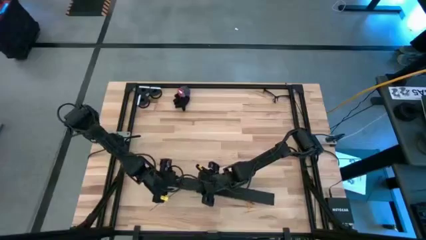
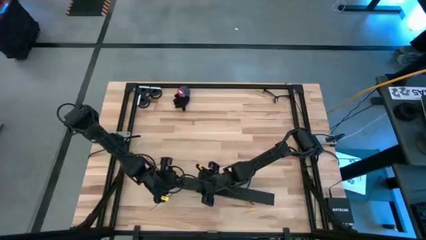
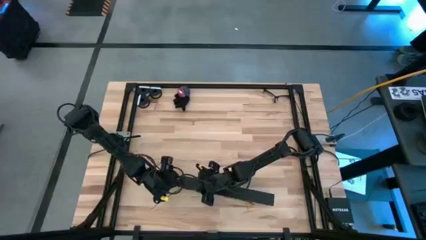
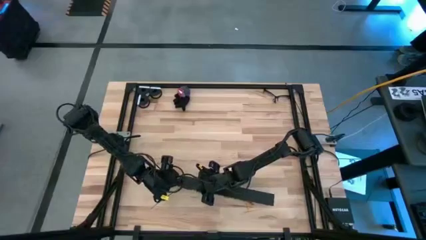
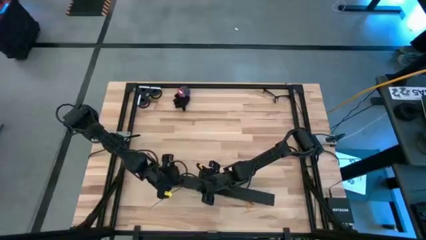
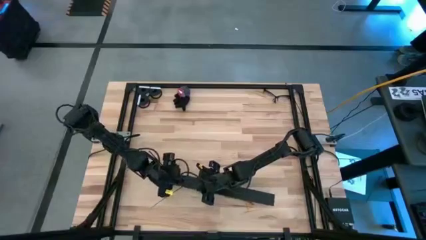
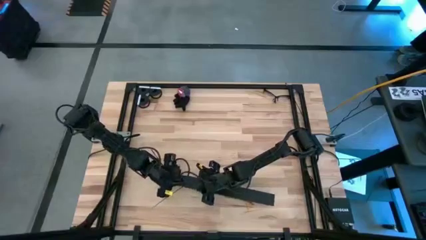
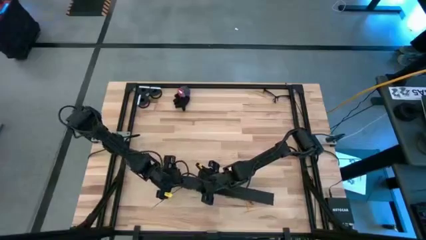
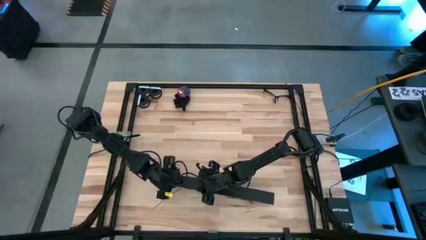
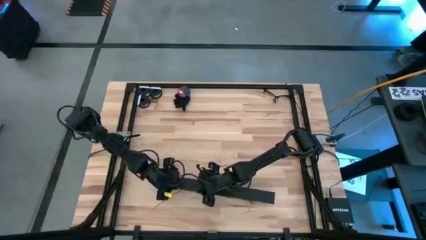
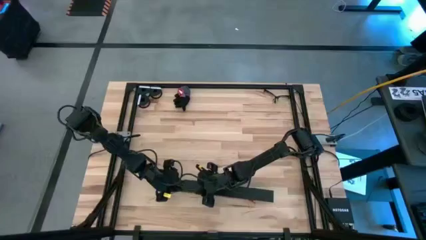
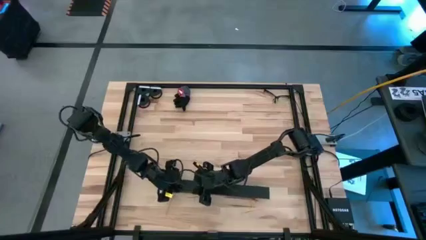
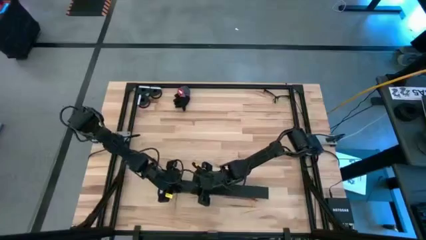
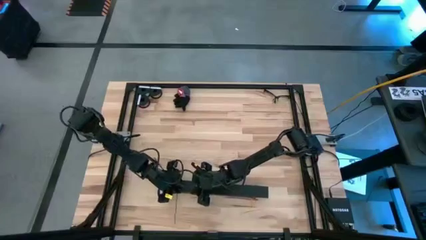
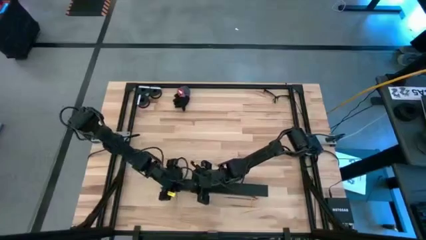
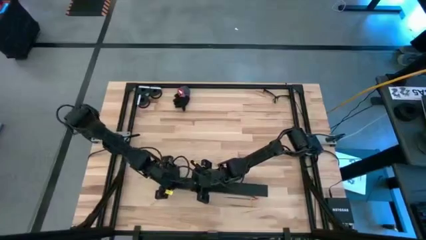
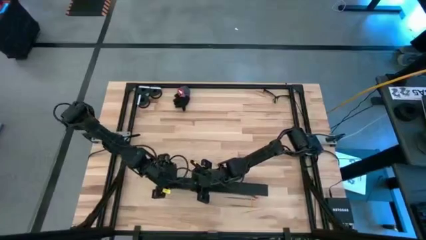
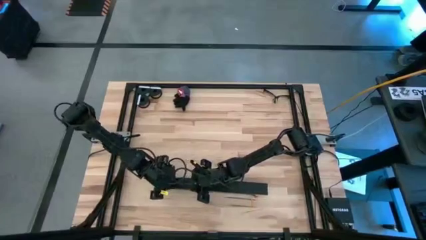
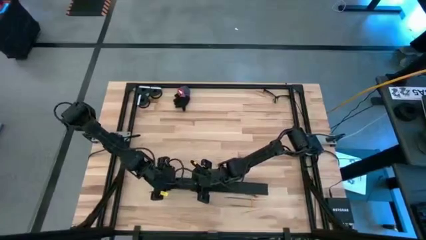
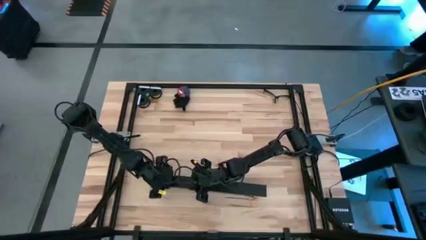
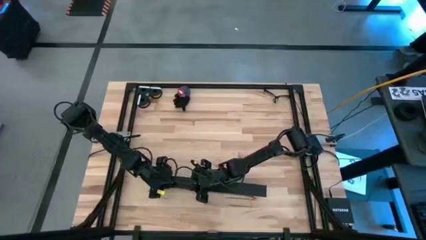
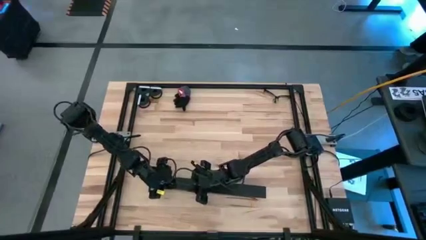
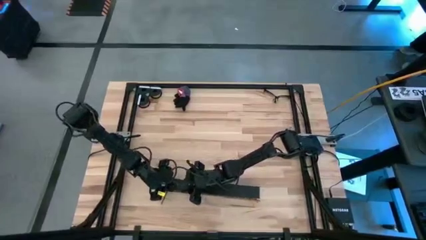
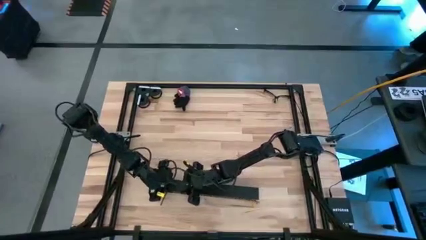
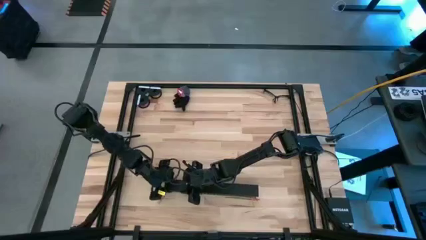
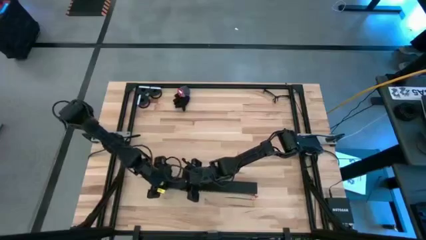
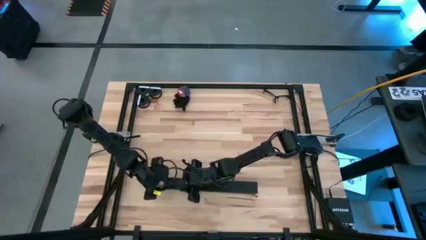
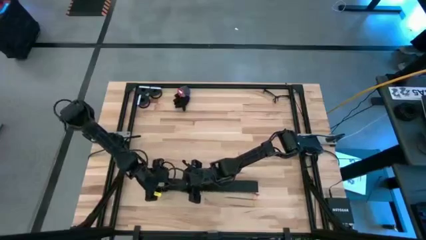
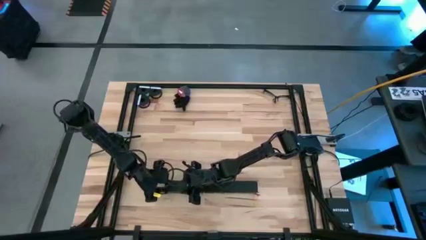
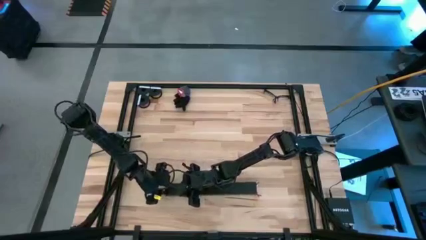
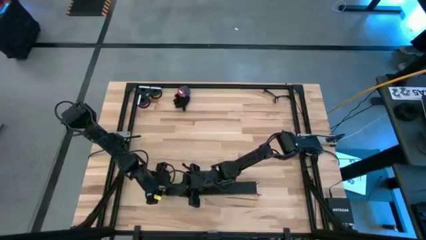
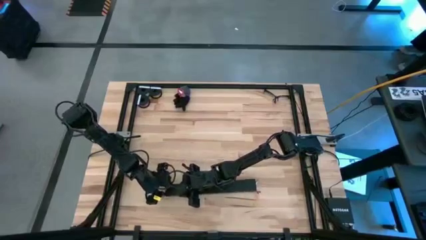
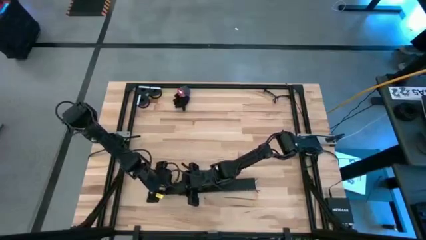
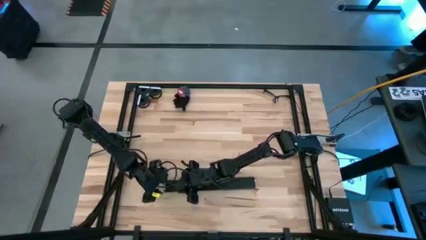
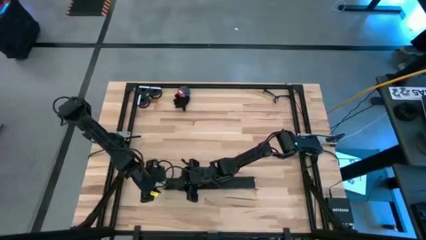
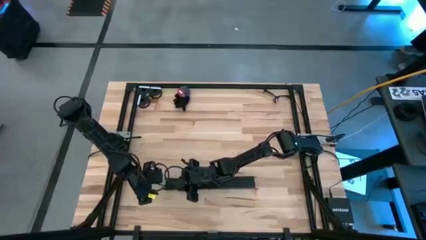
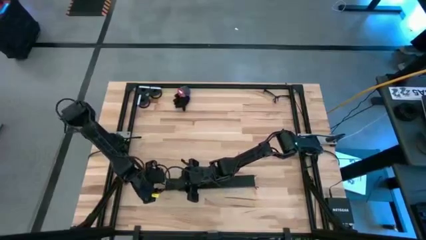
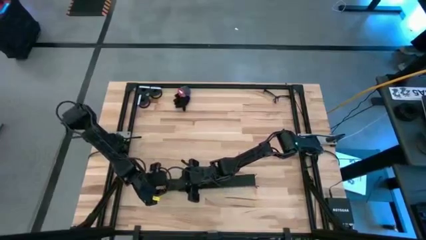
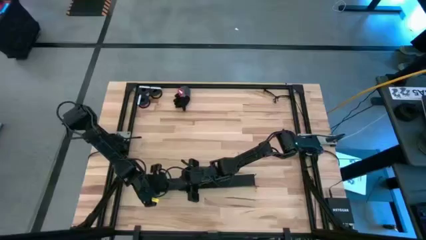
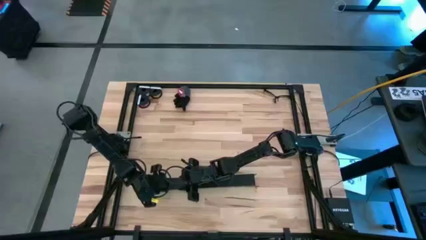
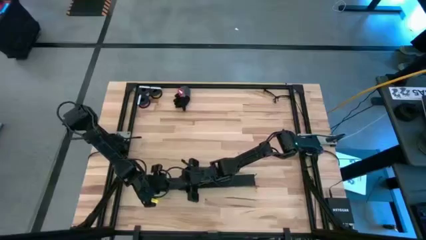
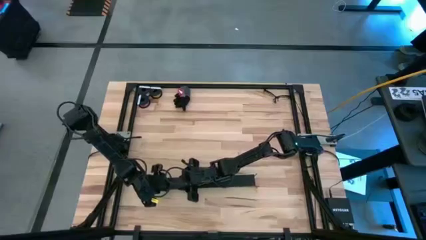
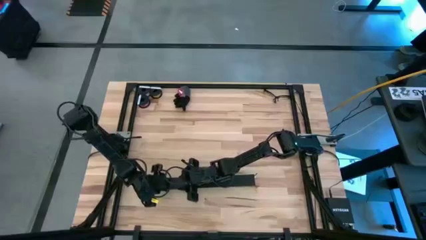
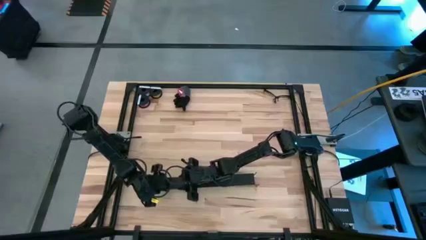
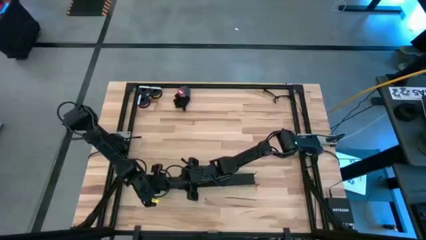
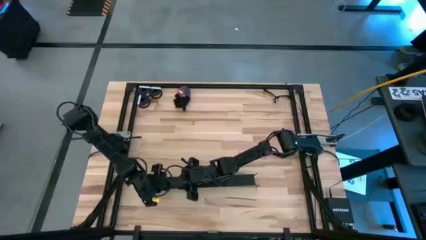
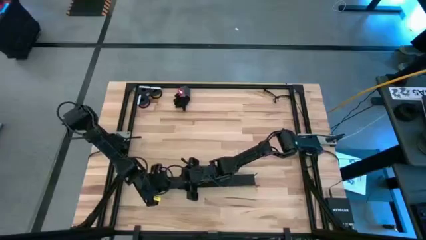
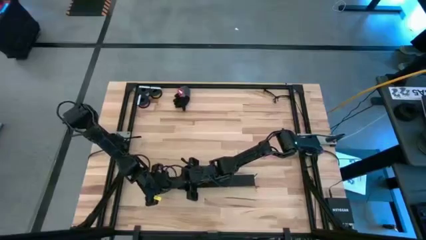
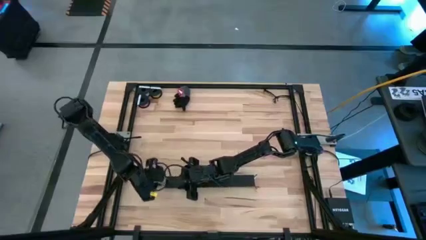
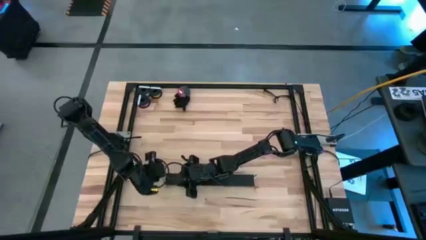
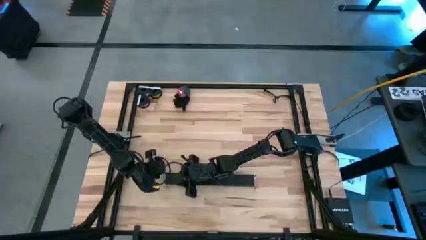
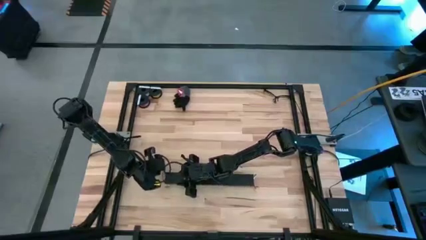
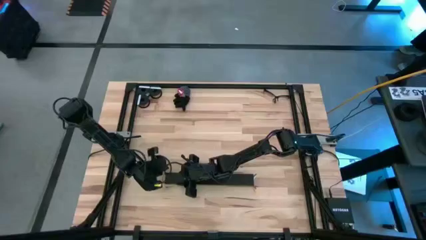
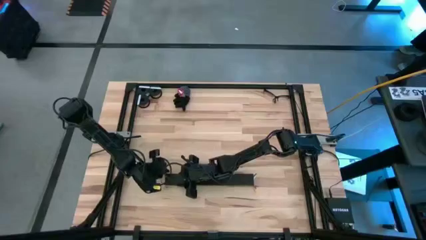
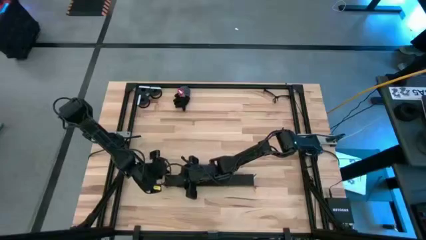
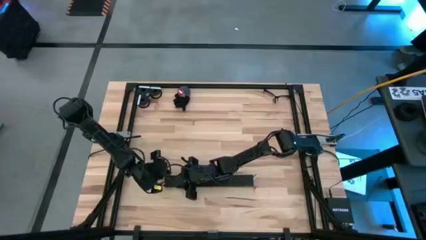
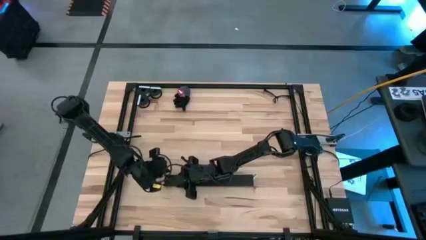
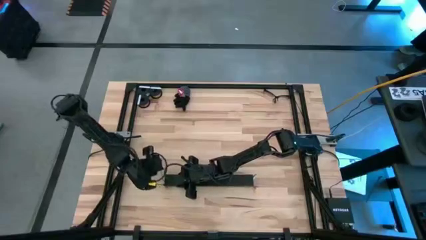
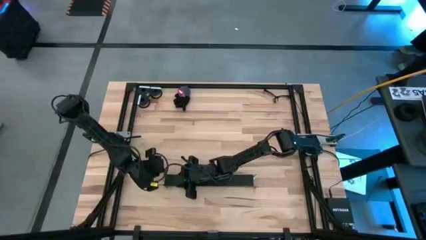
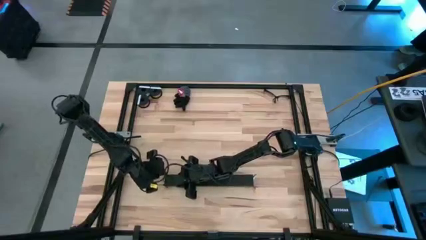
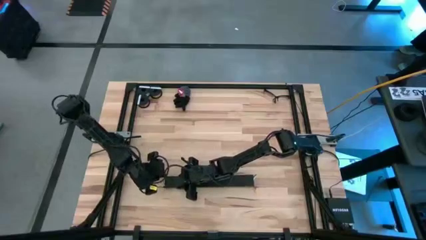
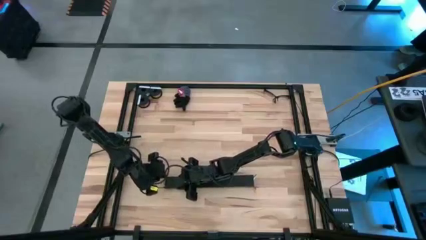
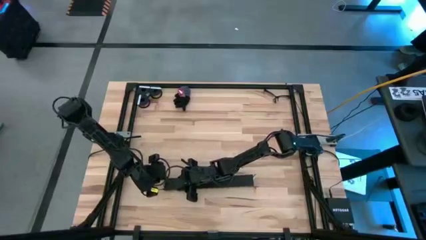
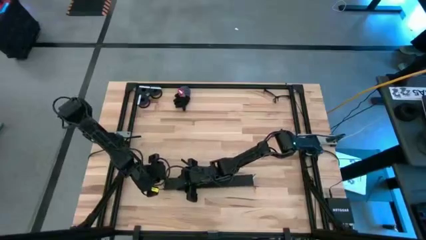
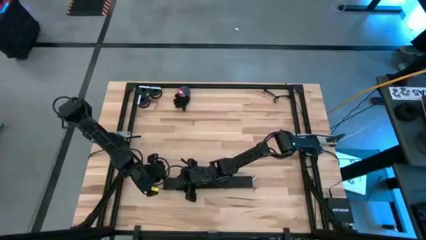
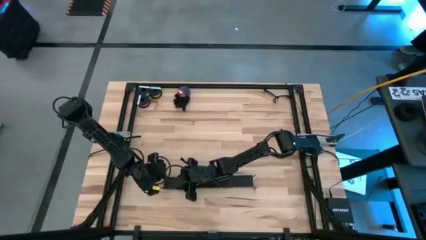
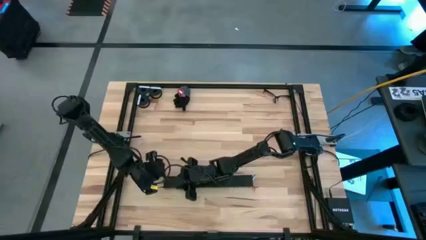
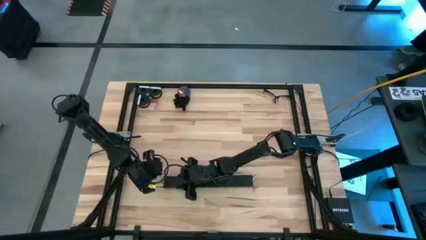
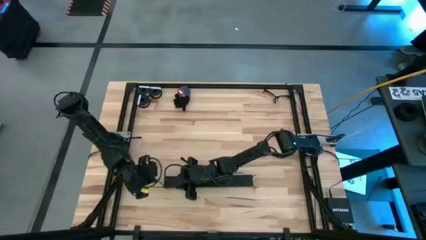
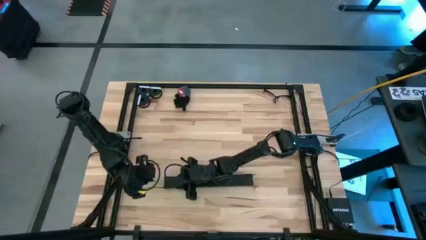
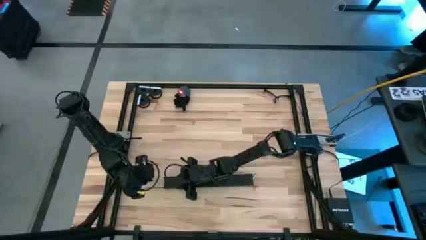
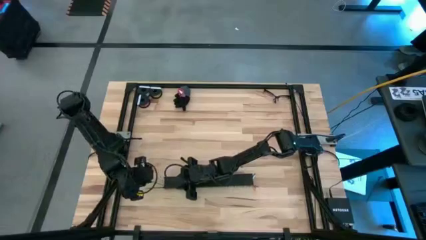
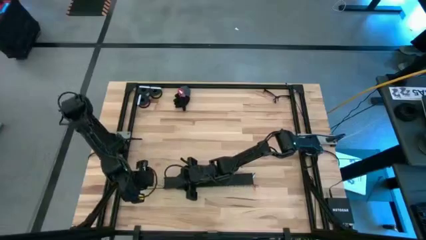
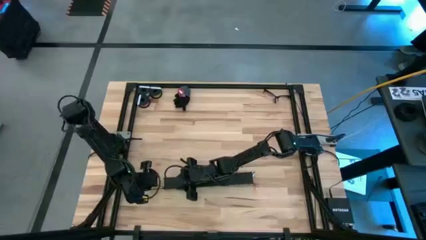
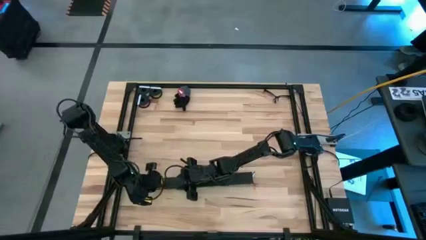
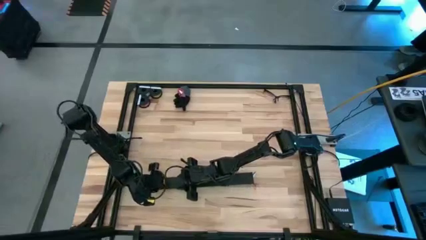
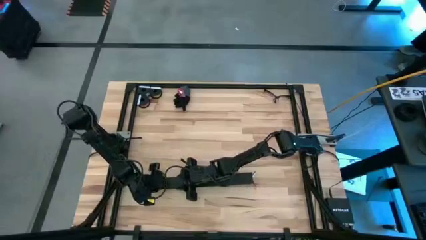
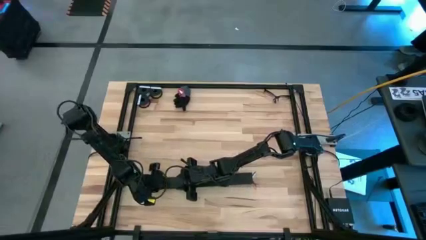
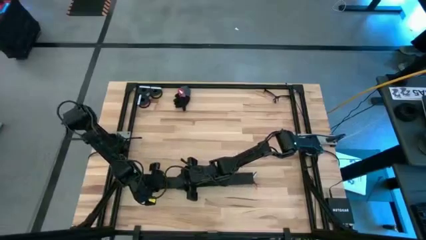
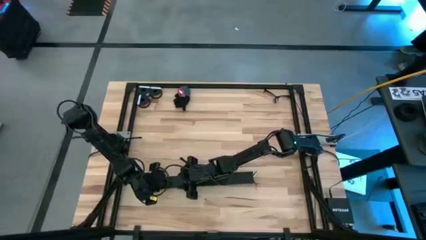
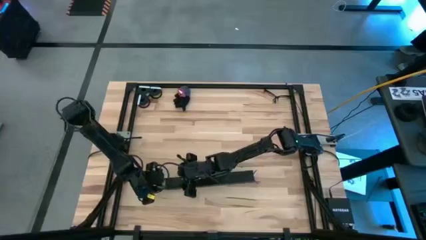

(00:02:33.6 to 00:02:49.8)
Task: Ziptie cables
Close the black cable duct
